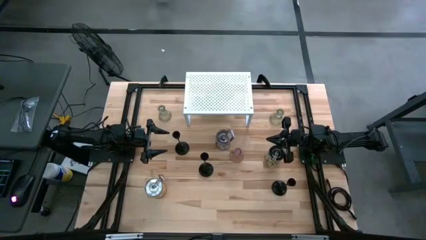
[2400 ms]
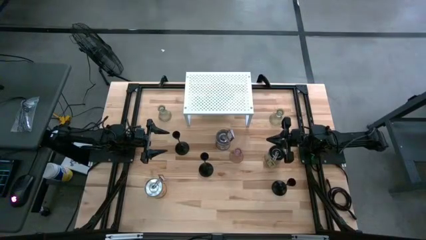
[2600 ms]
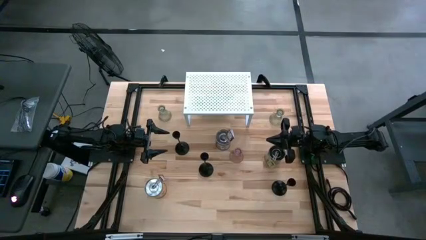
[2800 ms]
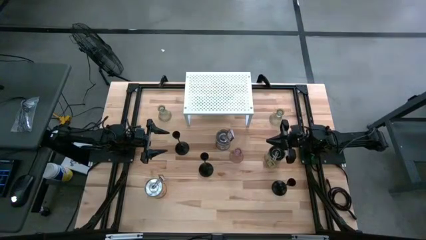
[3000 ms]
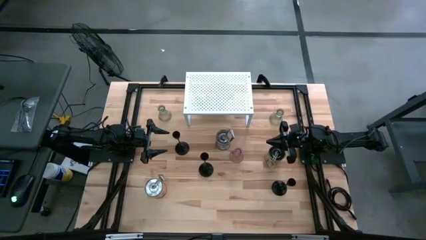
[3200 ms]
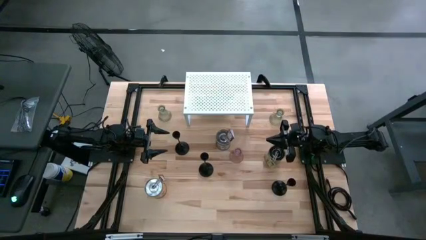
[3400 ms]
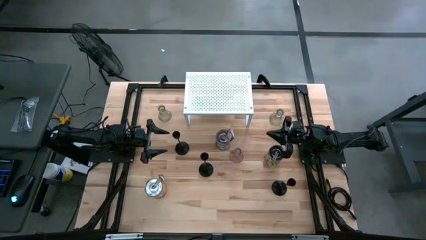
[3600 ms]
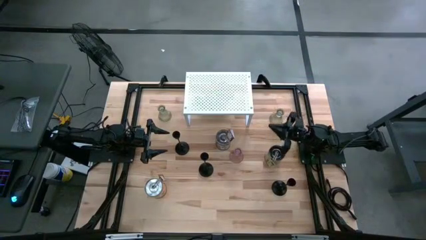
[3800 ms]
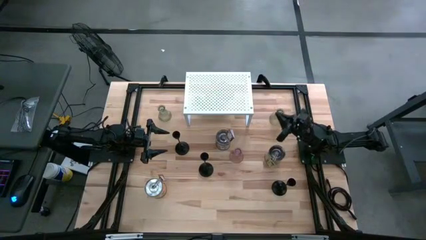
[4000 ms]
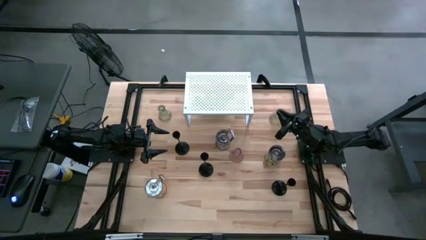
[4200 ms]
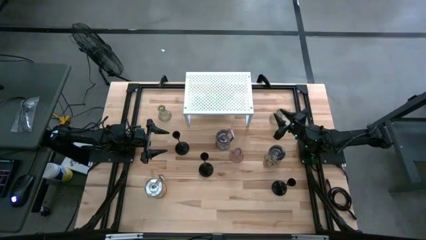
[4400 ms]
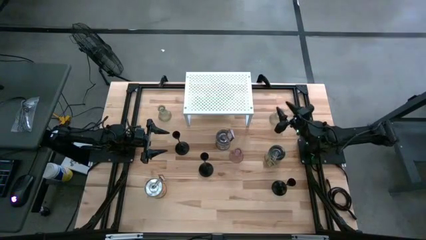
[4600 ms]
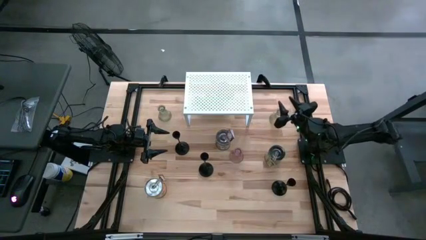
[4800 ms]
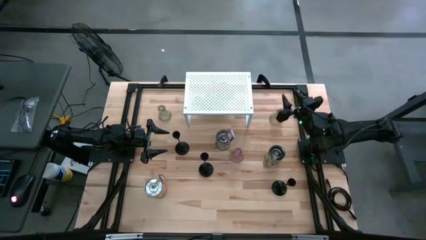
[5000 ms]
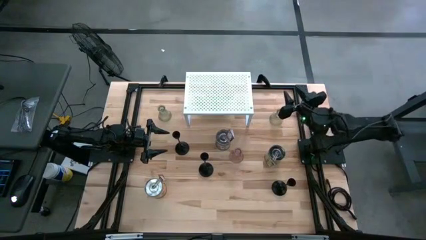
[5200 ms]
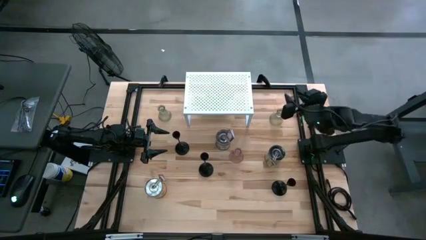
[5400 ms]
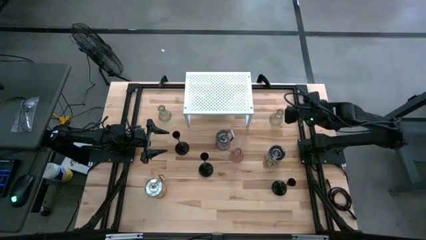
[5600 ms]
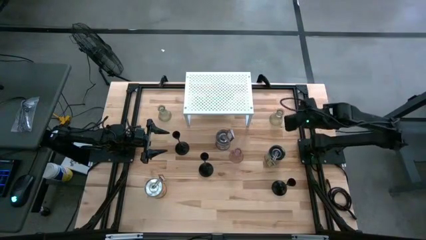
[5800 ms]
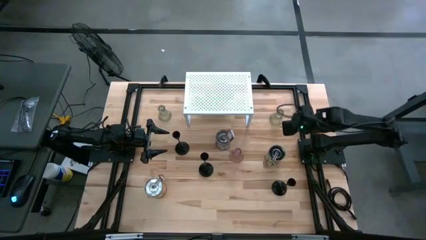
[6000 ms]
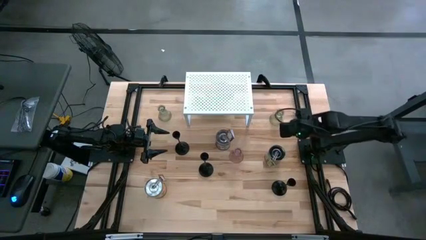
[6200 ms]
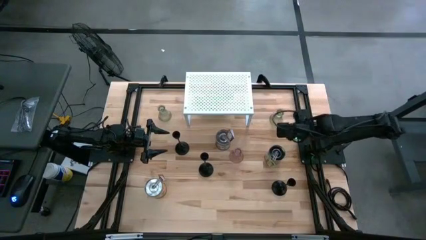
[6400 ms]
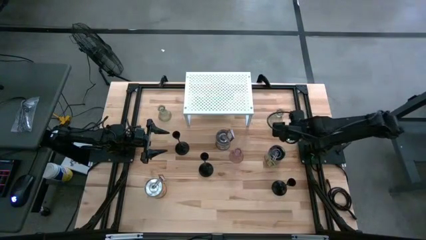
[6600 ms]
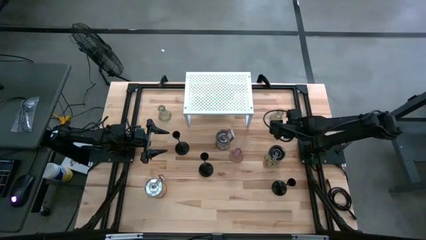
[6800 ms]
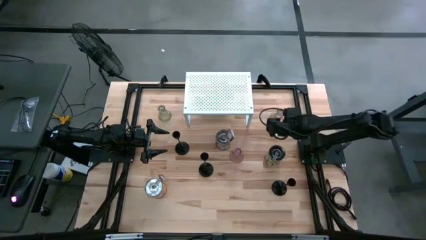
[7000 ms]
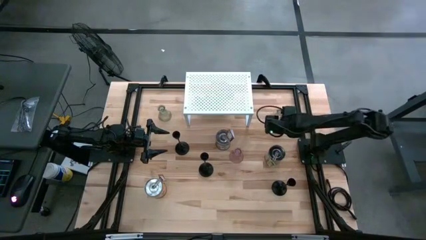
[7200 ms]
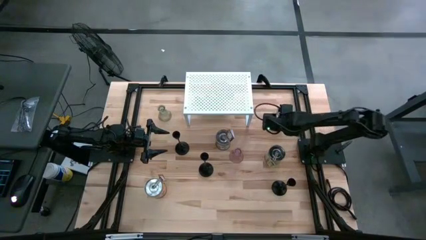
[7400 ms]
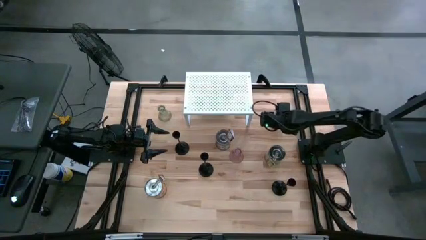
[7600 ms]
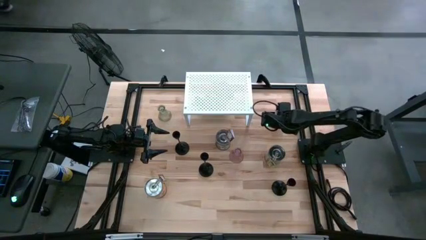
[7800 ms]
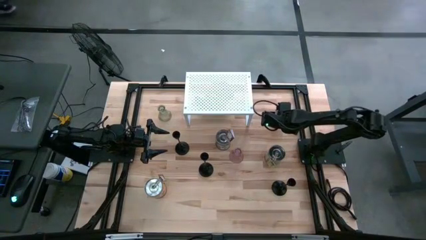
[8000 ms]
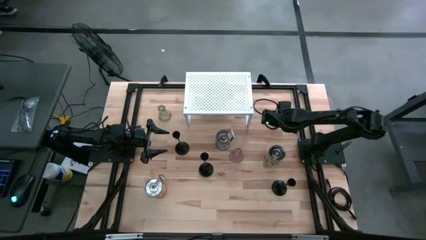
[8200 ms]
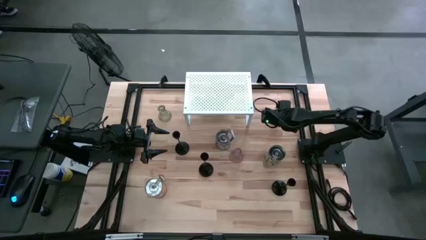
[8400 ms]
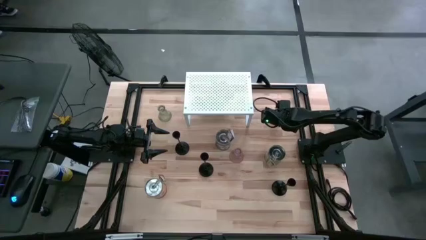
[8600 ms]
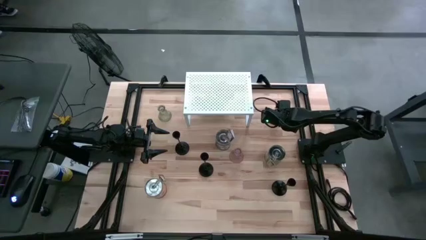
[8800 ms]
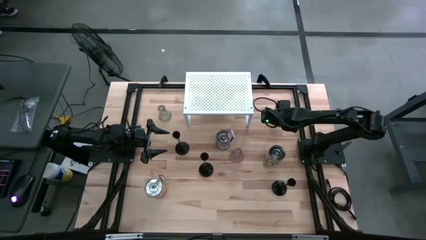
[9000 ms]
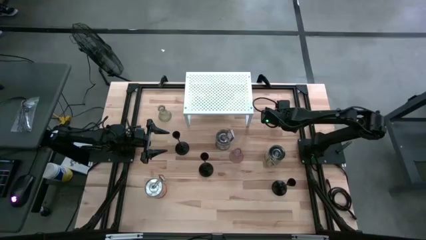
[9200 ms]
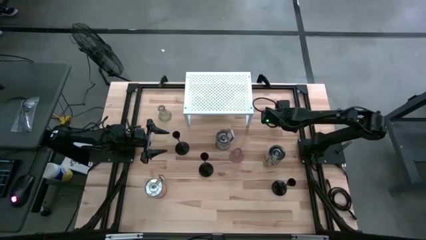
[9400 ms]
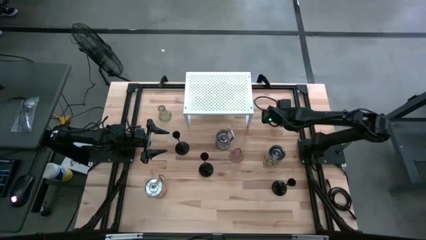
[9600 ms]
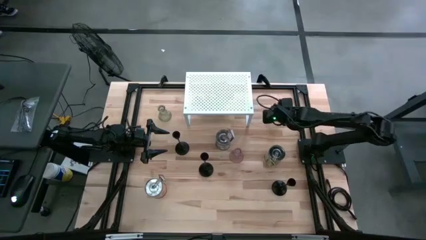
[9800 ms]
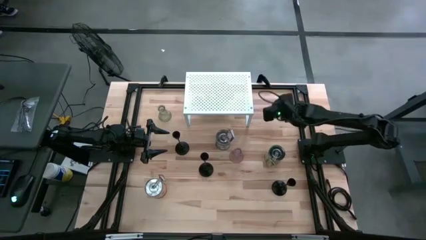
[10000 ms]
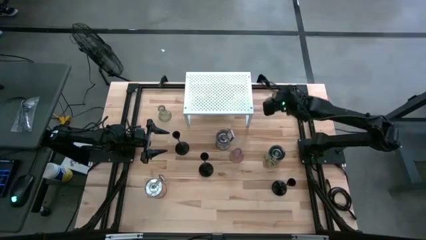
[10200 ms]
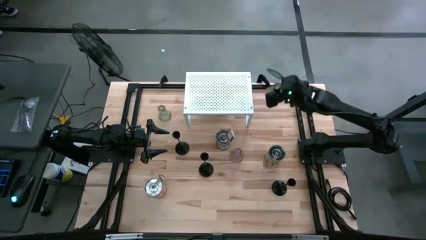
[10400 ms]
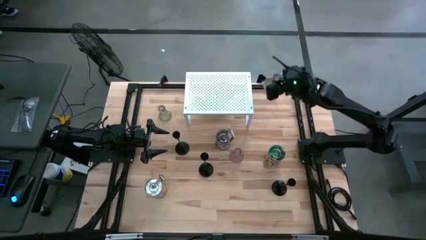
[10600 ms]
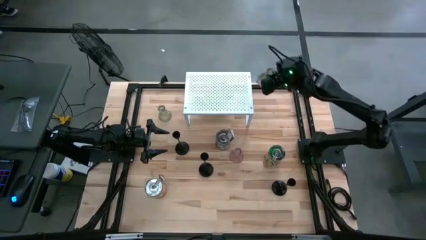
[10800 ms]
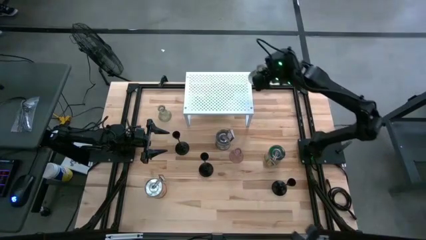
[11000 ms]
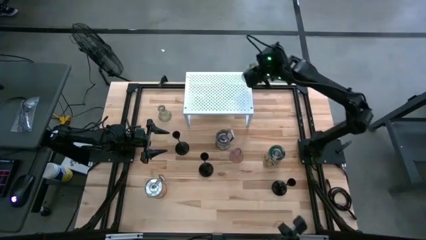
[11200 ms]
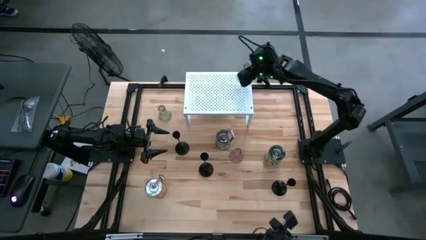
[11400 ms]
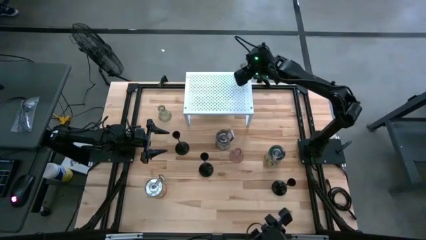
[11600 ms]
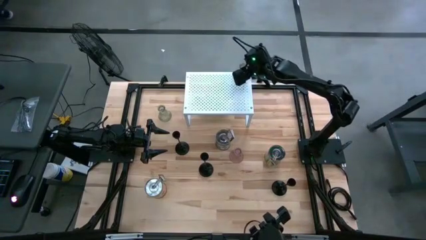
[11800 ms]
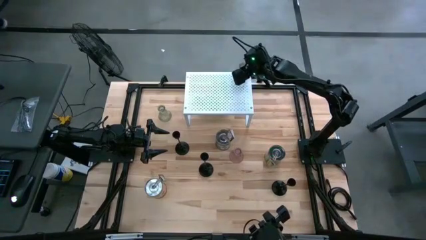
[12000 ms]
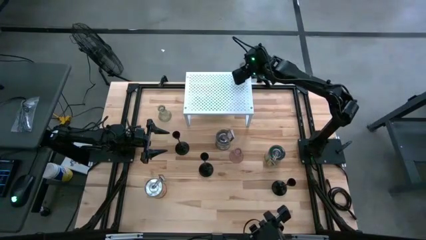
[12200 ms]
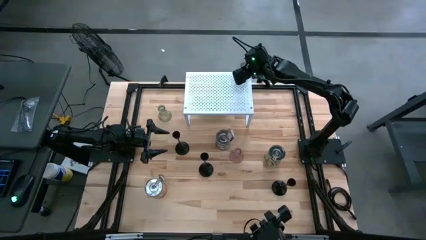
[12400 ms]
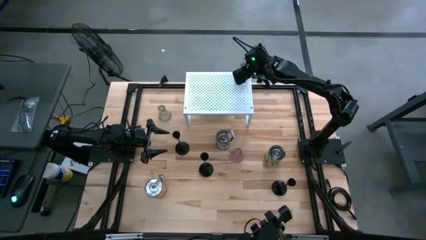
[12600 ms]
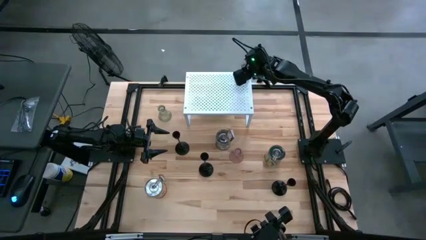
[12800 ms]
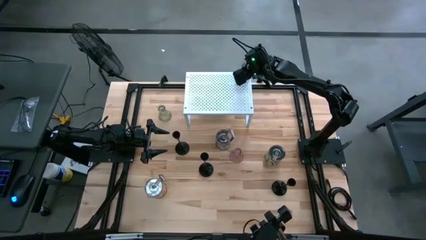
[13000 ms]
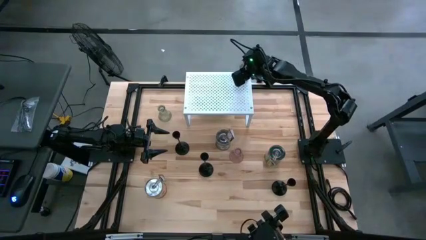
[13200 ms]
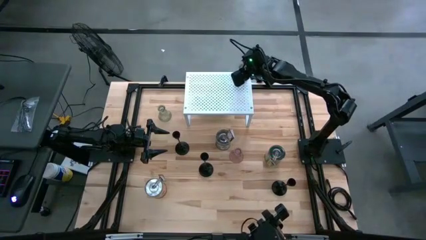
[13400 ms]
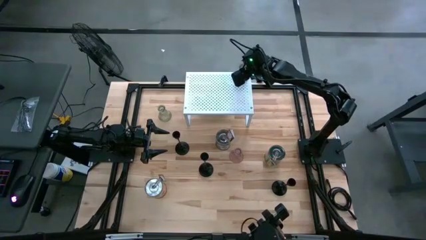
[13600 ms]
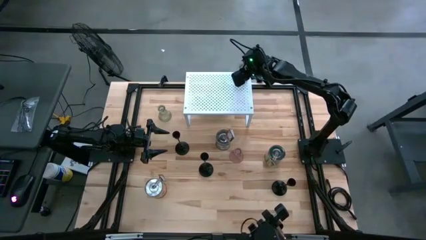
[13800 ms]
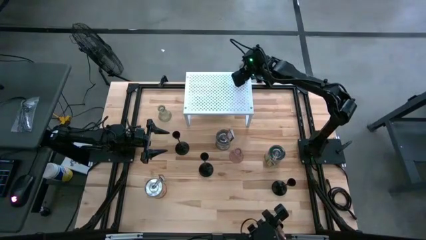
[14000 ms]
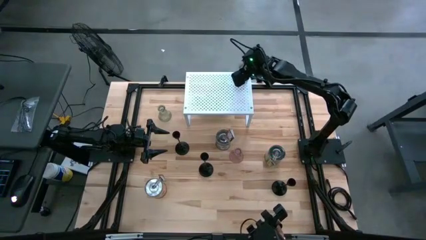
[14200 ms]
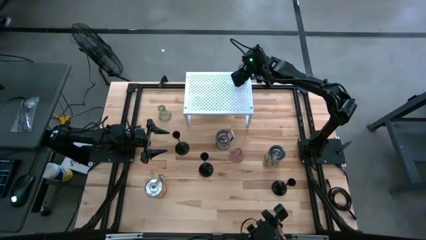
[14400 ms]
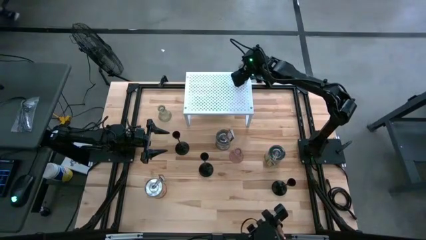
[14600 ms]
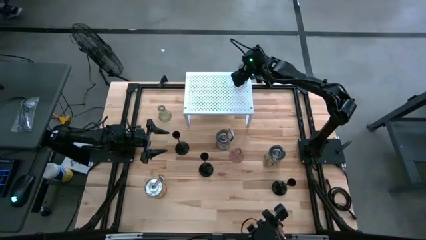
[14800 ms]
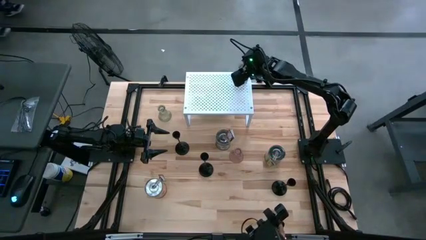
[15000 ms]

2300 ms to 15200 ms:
Task: Pick & Place candle stick holders
Put the right green glass candle holder on the shelf
